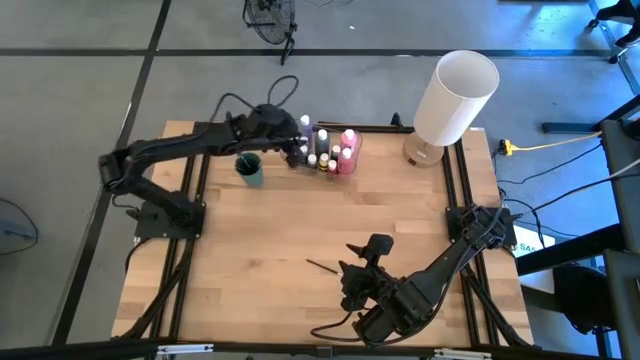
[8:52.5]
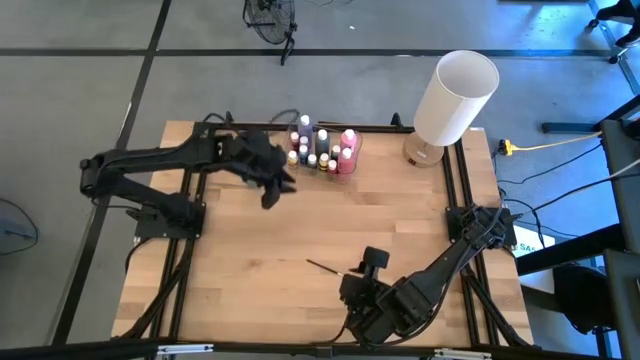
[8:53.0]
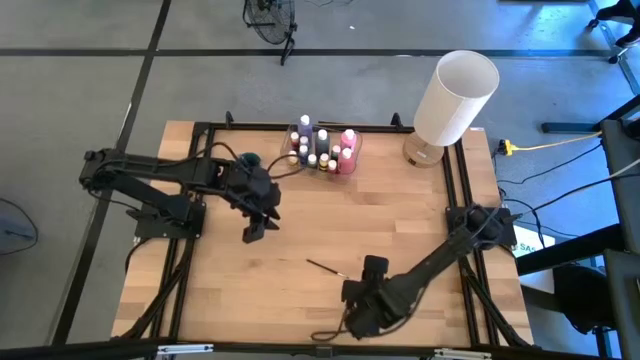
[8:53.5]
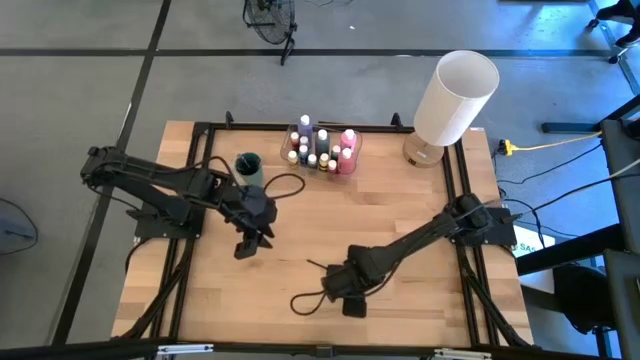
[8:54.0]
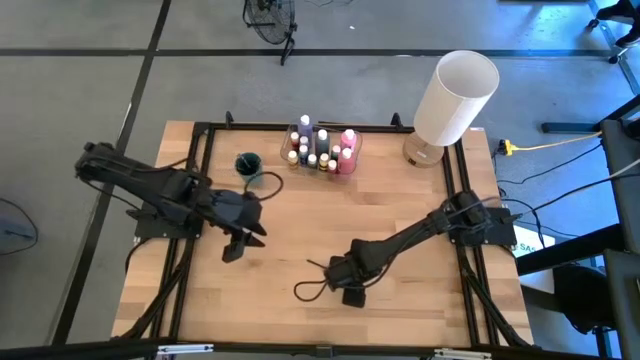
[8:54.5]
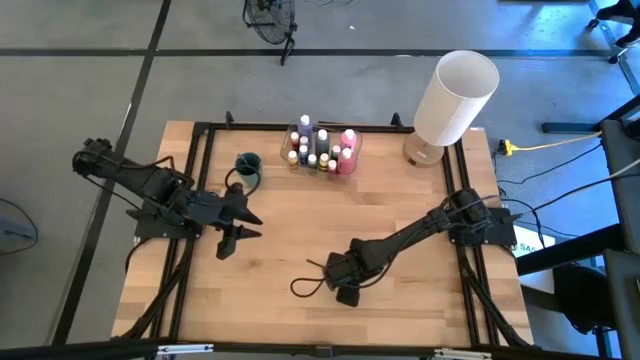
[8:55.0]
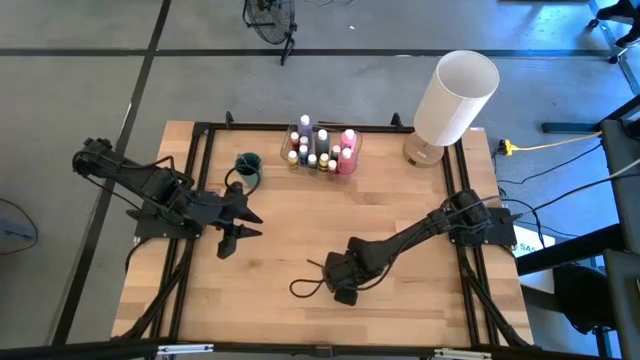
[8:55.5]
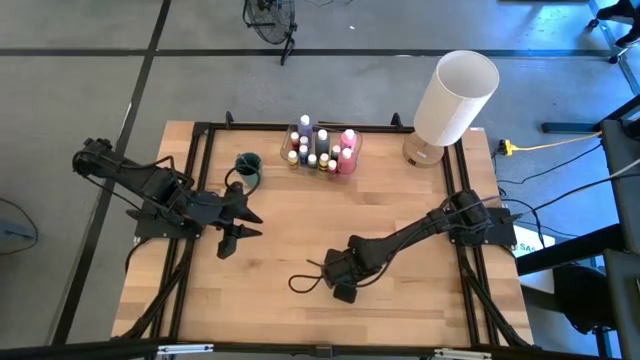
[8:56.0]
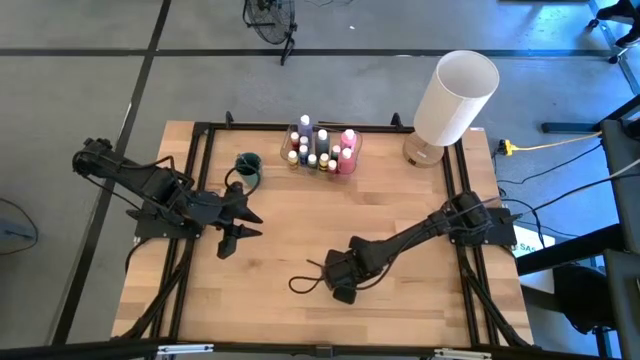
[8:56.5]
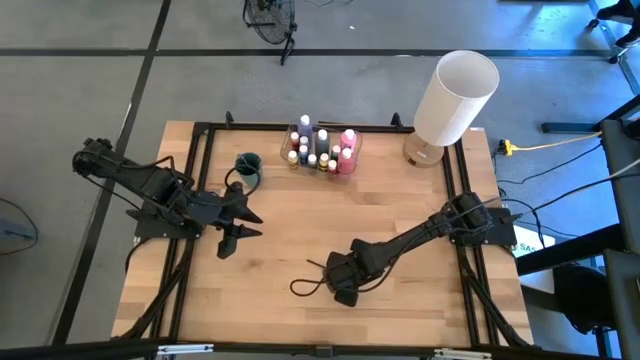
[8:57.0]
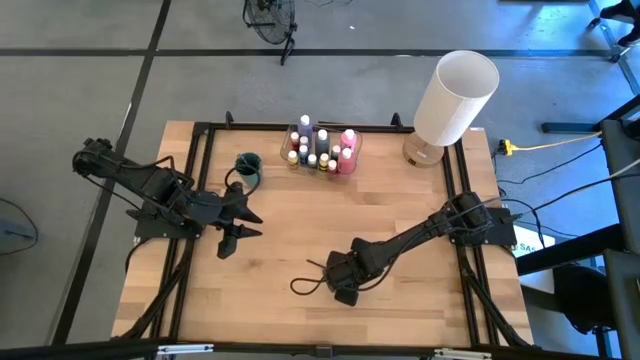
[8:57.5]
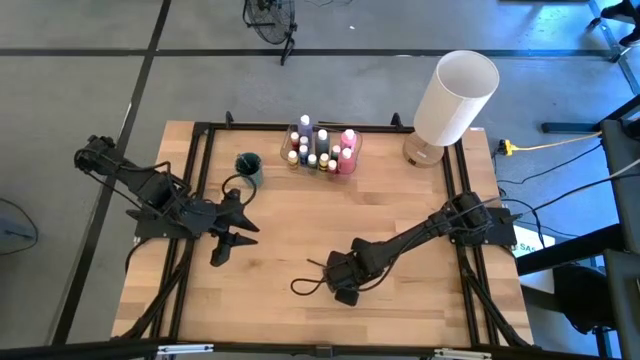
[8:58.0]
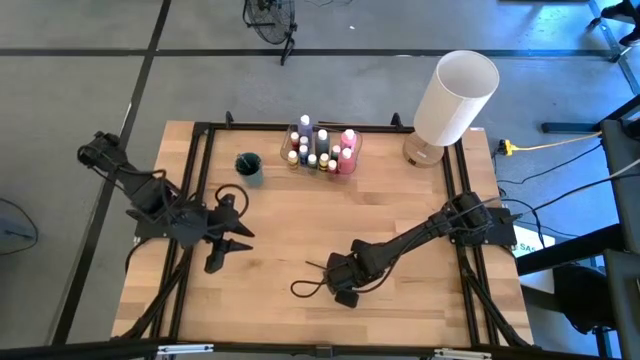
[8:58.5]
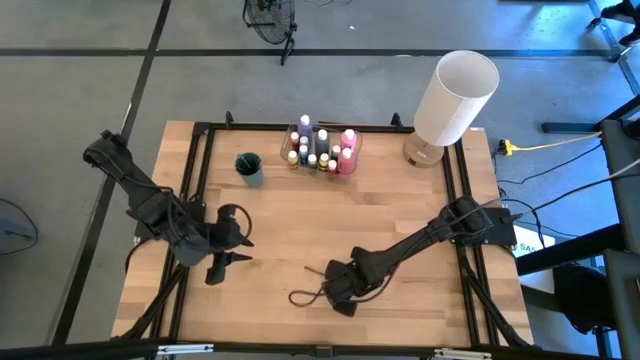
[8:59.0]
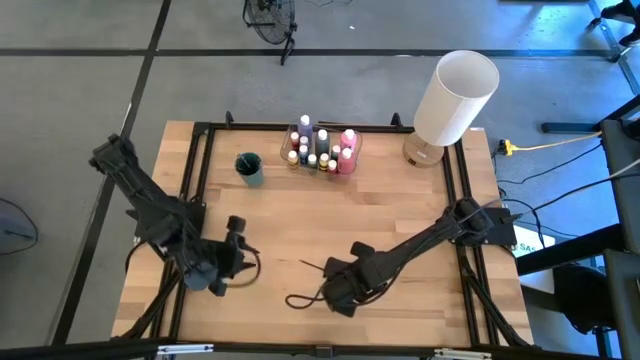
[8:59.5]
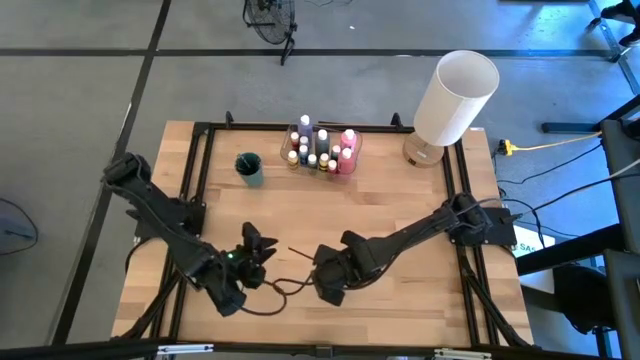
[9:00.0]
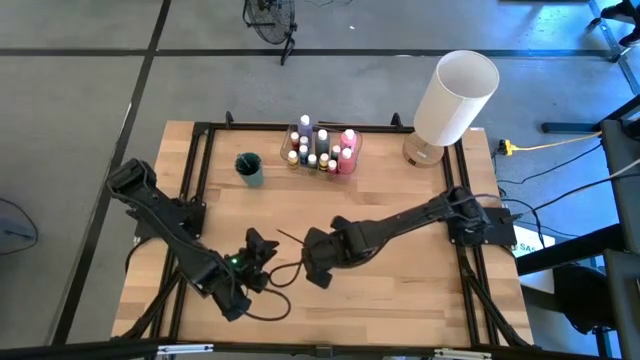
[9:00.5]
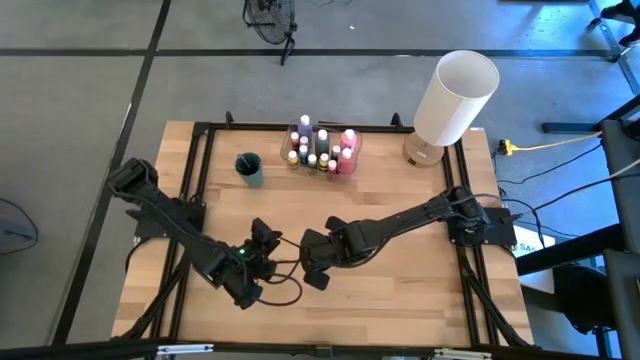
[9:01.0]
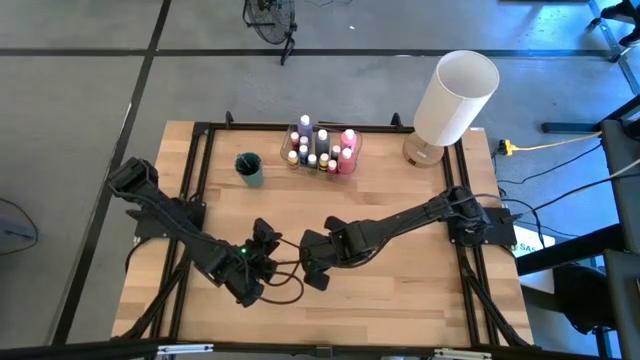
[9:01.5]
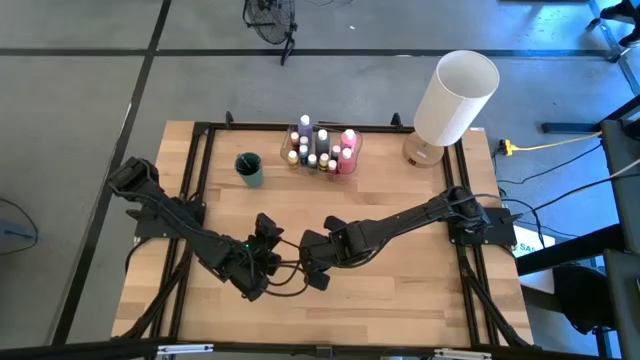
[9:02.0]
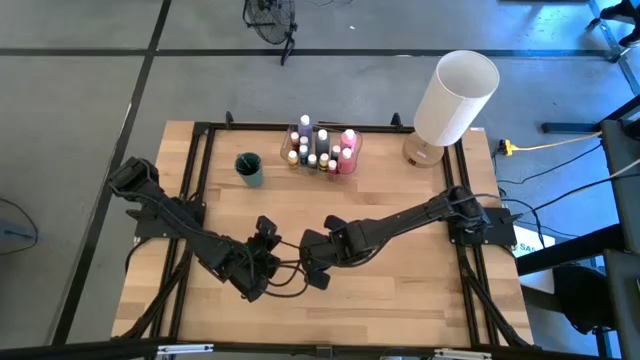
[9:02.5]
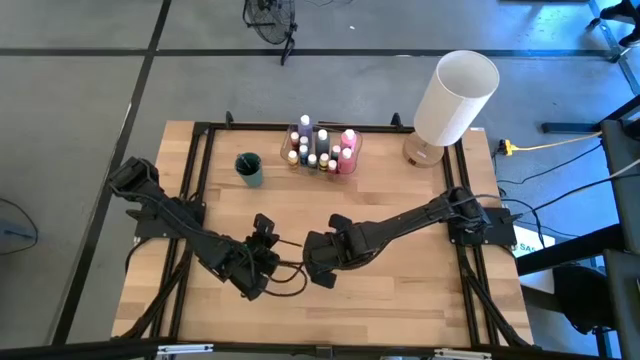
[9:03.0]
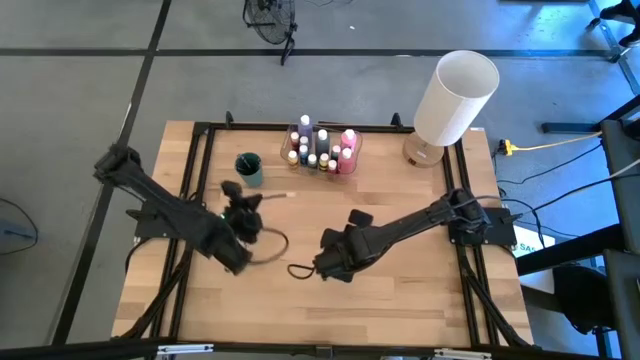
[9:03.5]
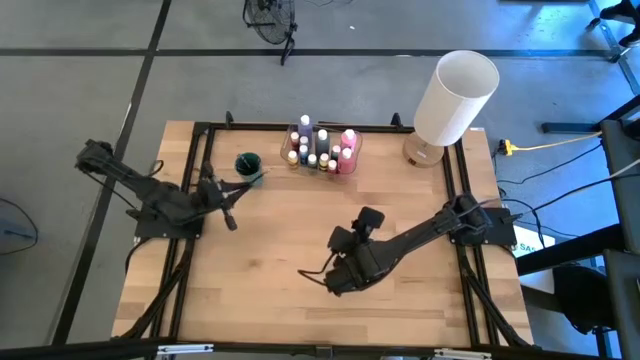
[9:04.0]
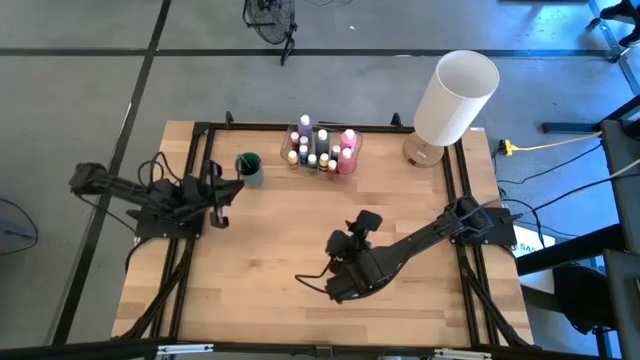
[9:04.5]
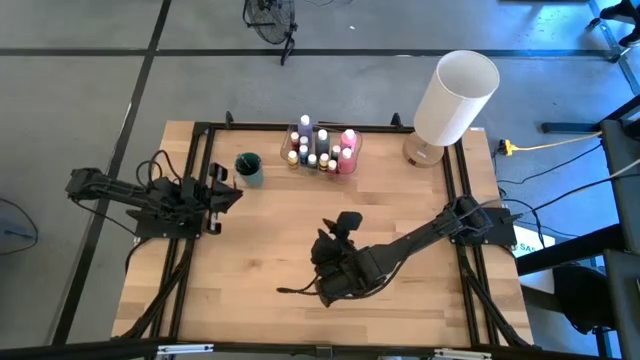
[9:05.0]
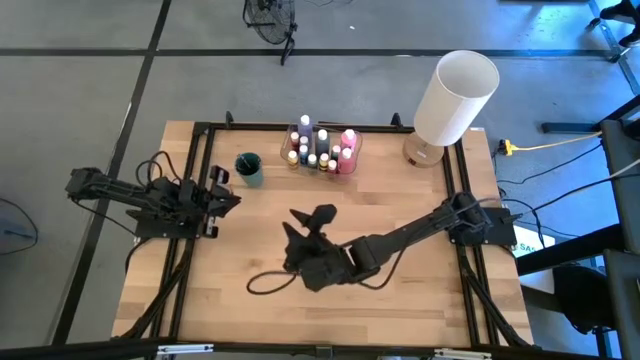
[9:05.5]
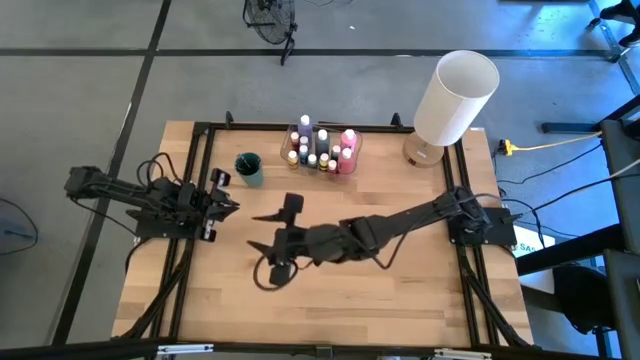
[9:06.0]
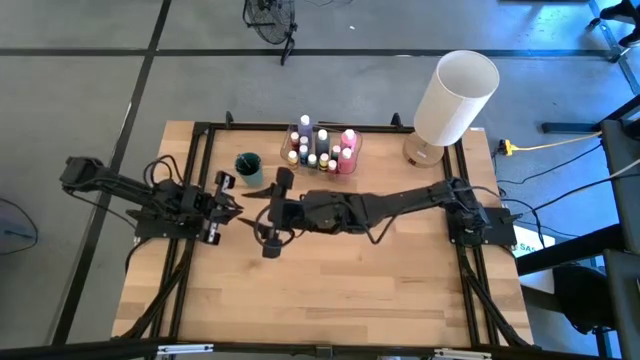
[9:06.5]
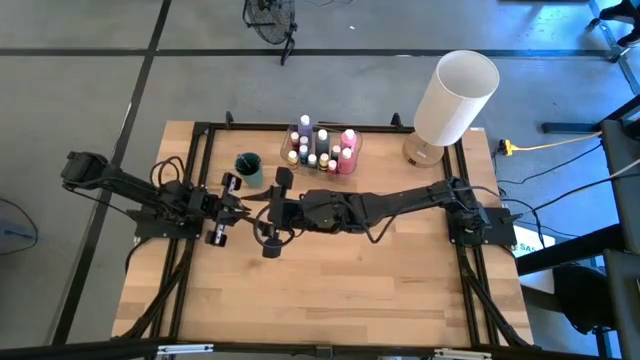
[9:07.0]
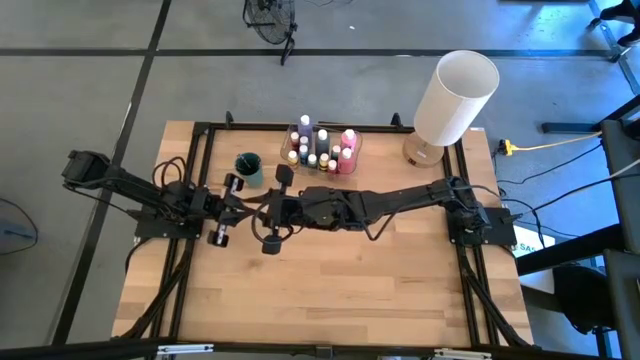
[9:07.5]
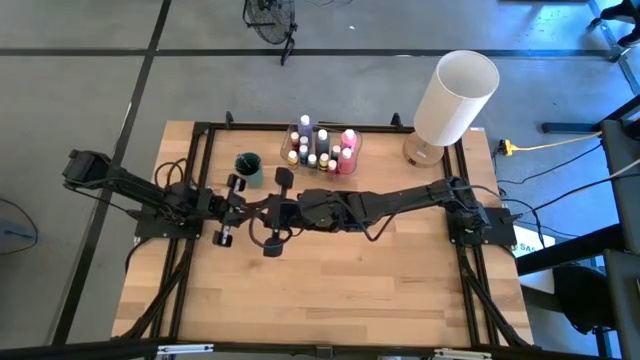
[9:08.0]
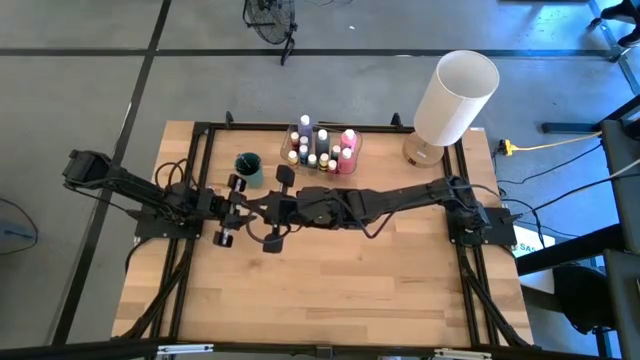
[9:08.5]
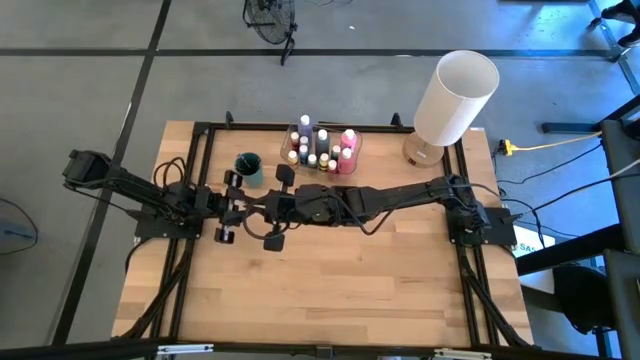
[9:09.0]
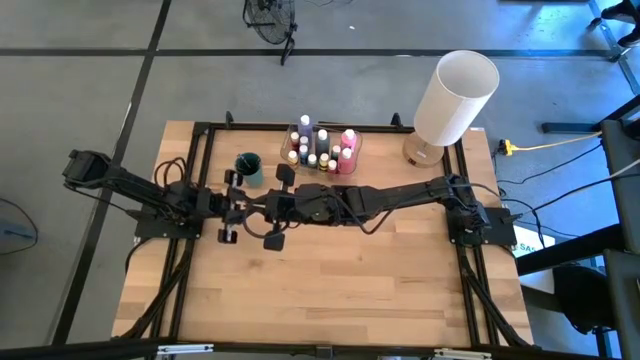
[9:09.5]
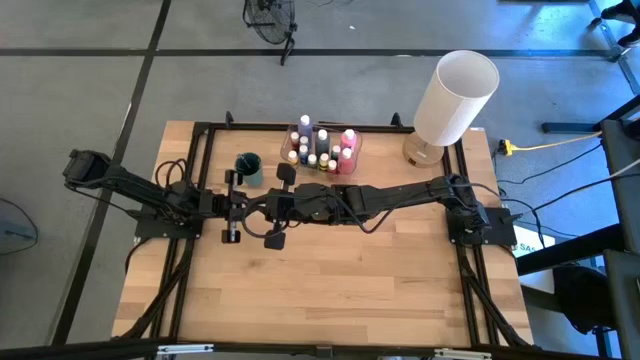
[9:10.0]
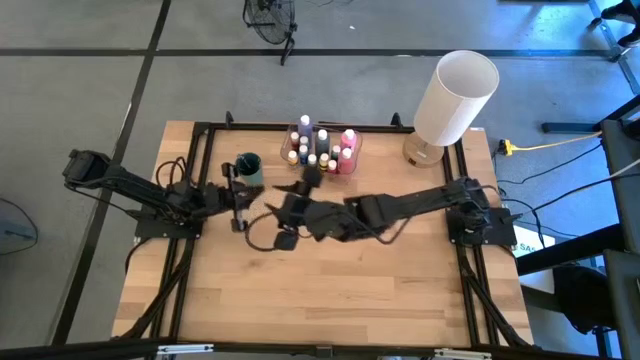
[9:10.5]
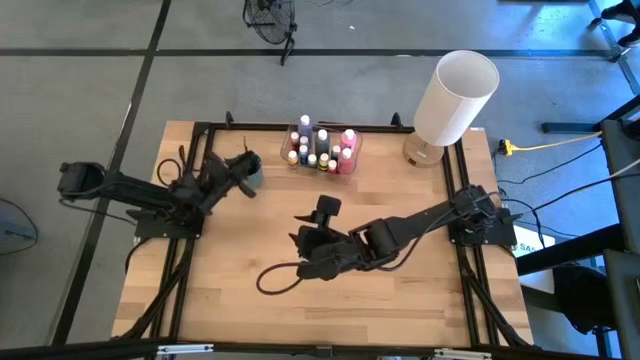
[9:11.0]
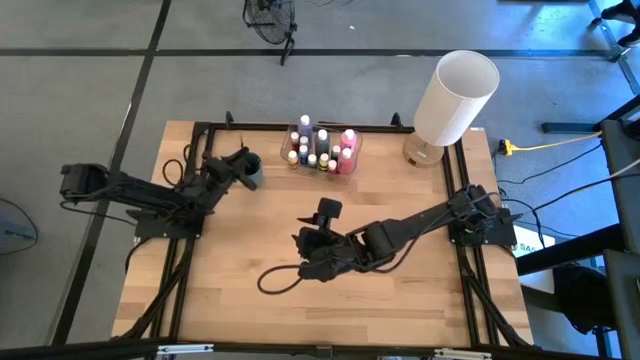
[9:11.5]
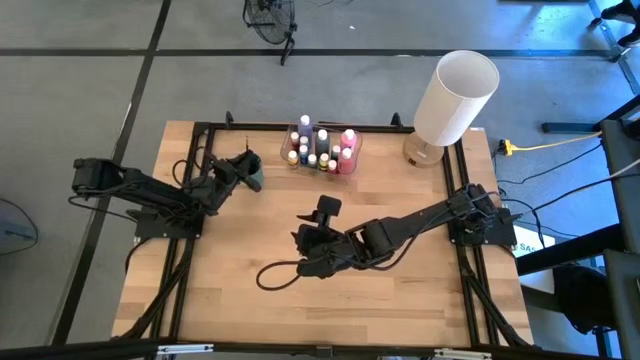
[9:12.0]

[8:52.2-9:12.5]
Task: Pick & Place Paint Supplies
Put the silver paint brush into the green cup

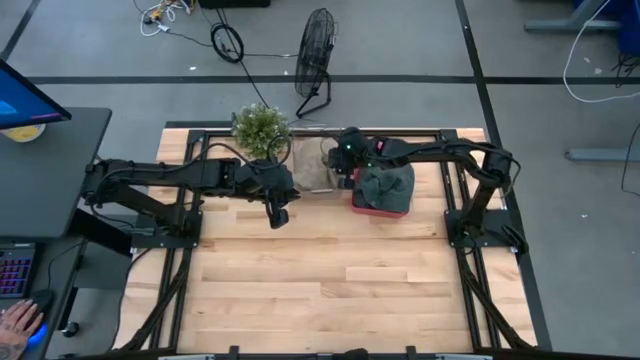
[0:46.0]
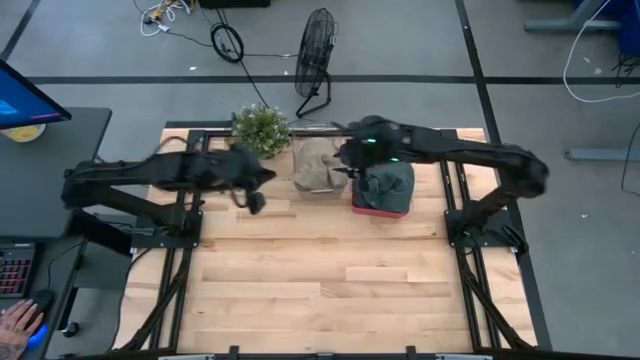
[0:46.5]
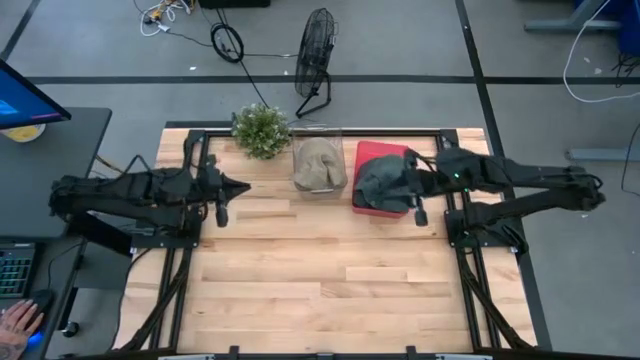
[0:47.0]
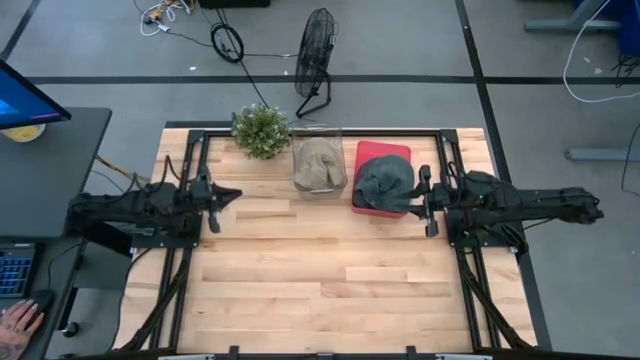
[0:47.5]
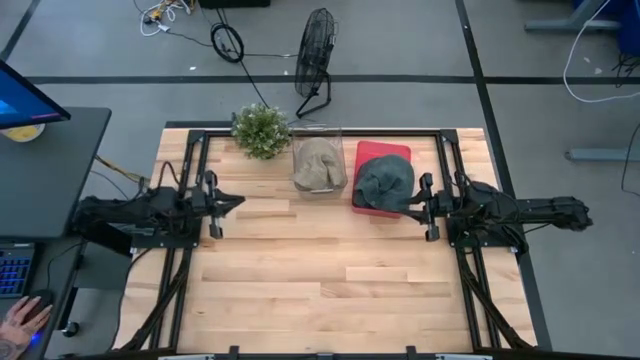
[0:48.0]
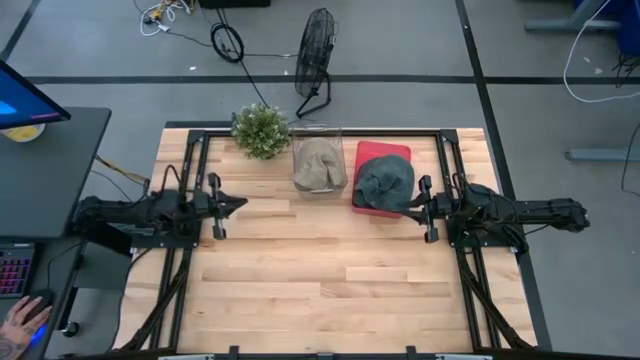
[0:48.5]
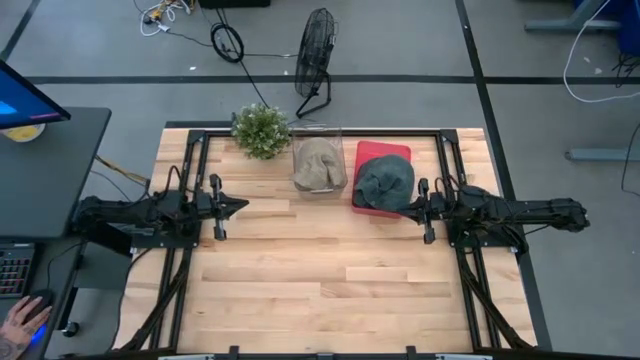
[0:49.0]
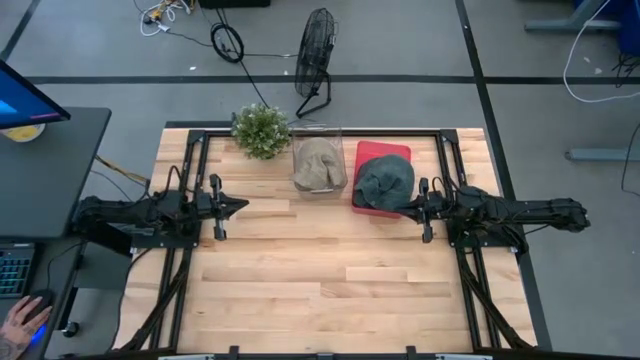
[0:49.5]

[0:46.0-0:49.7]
Task: Pick & Place hat
Return to Home Position
